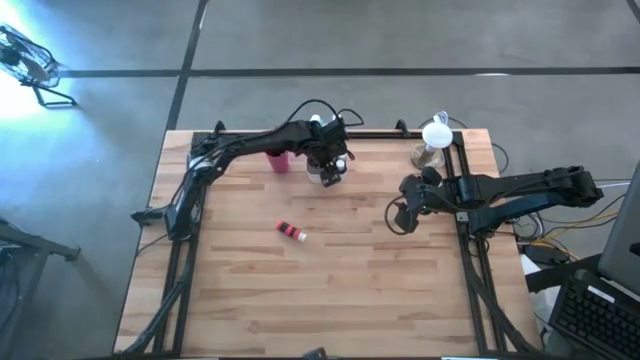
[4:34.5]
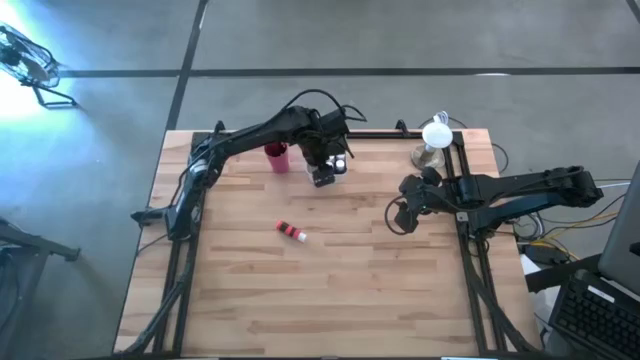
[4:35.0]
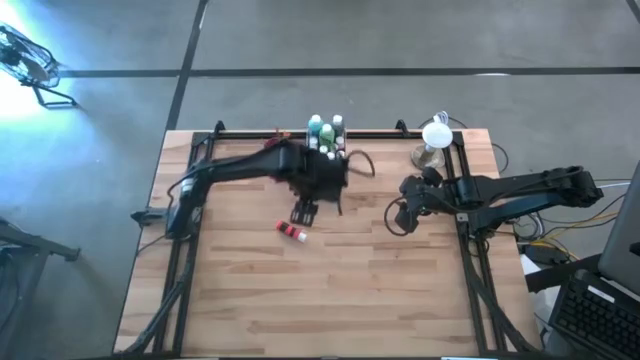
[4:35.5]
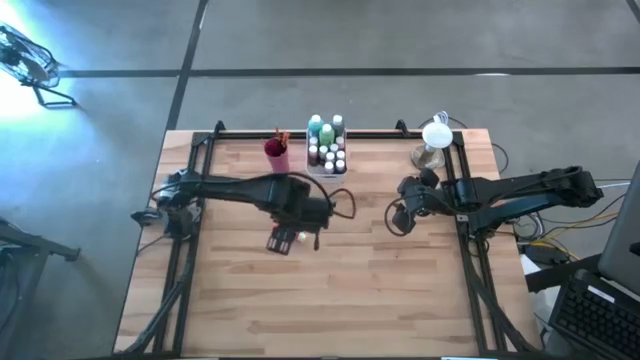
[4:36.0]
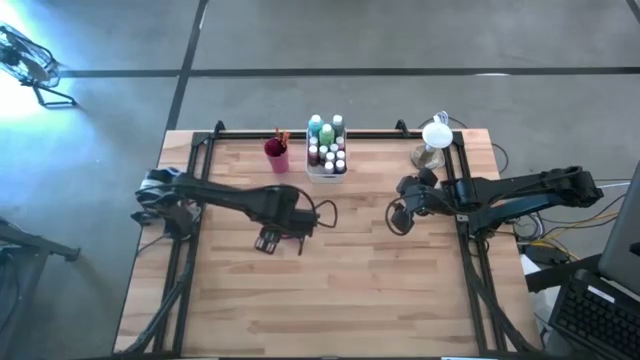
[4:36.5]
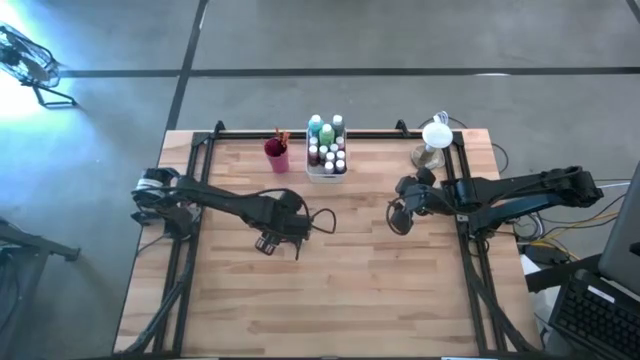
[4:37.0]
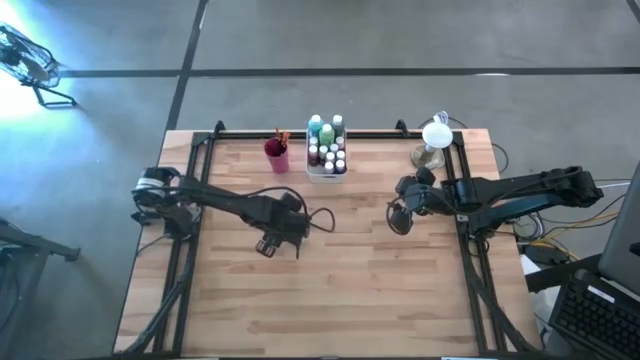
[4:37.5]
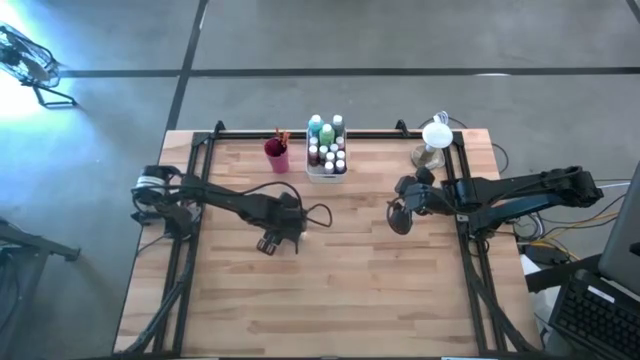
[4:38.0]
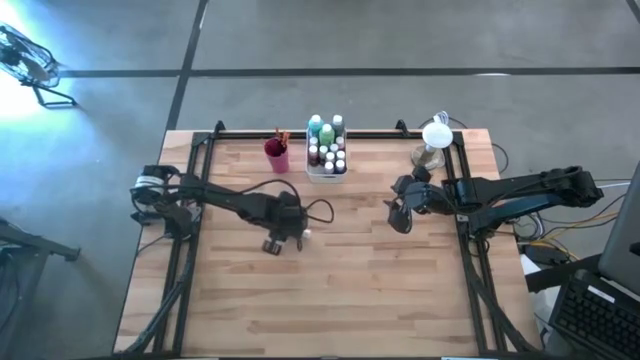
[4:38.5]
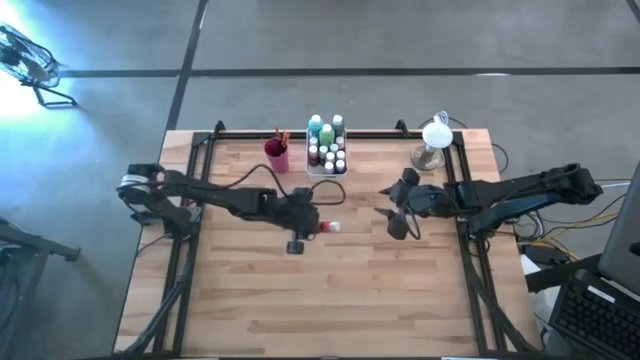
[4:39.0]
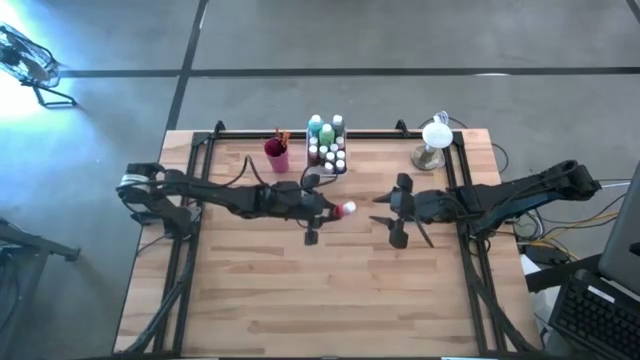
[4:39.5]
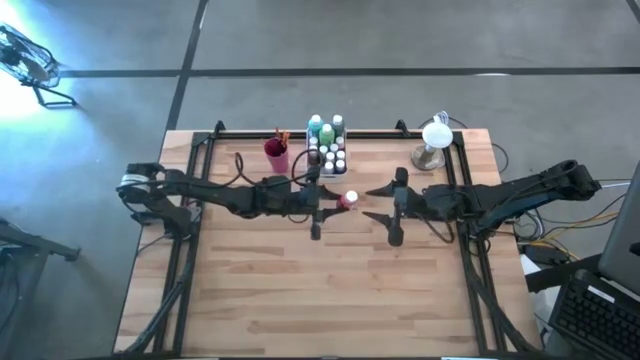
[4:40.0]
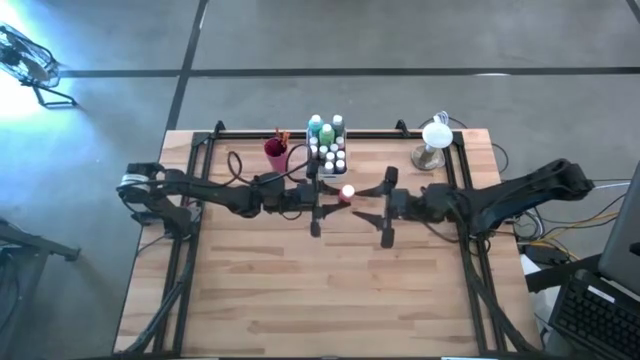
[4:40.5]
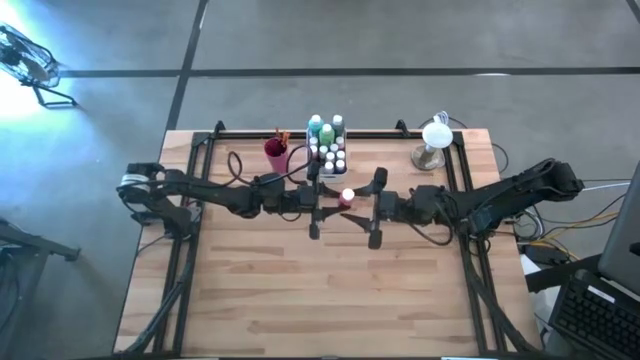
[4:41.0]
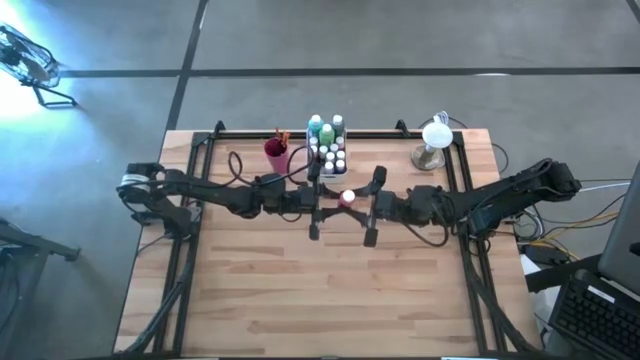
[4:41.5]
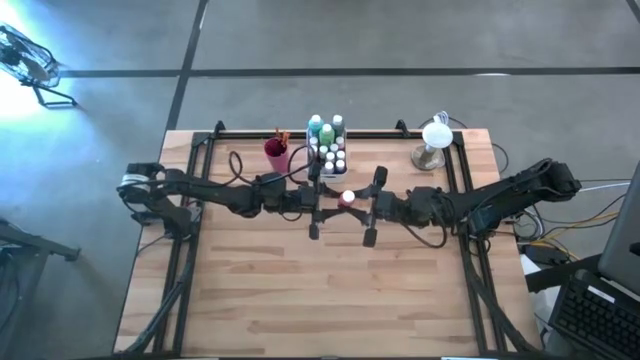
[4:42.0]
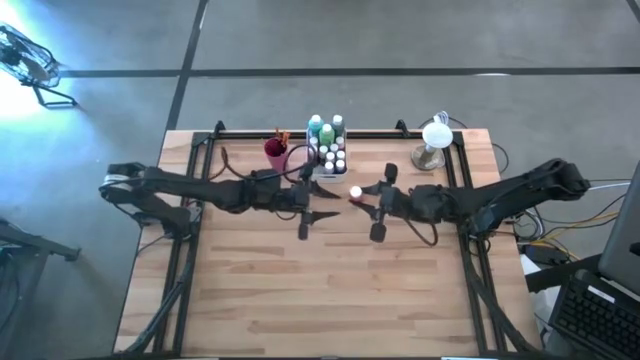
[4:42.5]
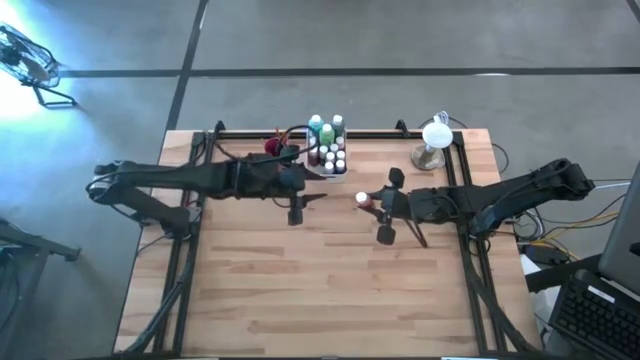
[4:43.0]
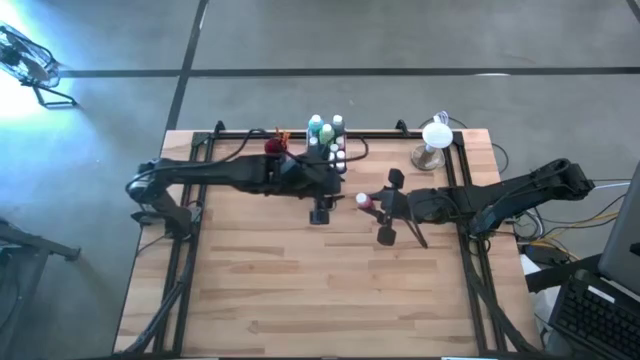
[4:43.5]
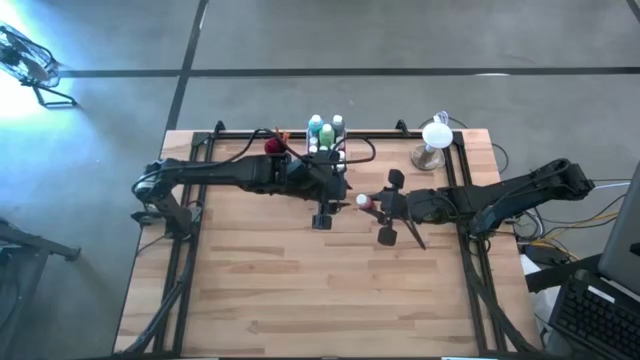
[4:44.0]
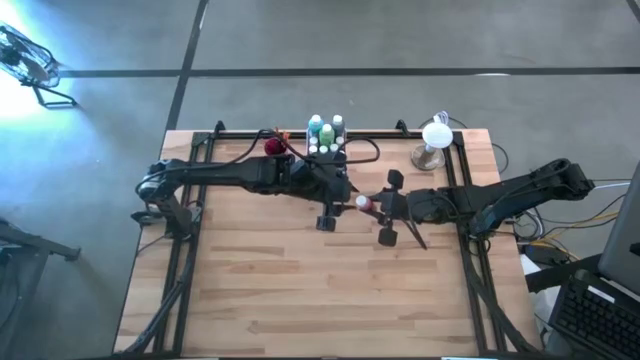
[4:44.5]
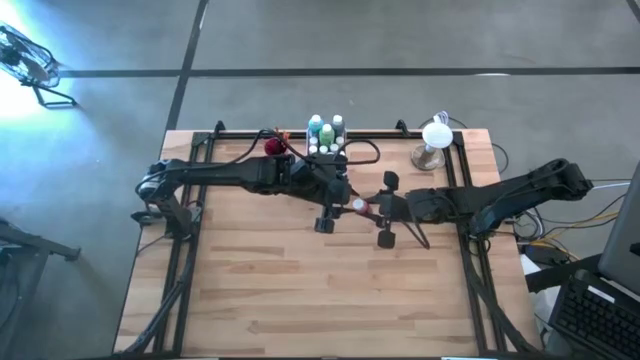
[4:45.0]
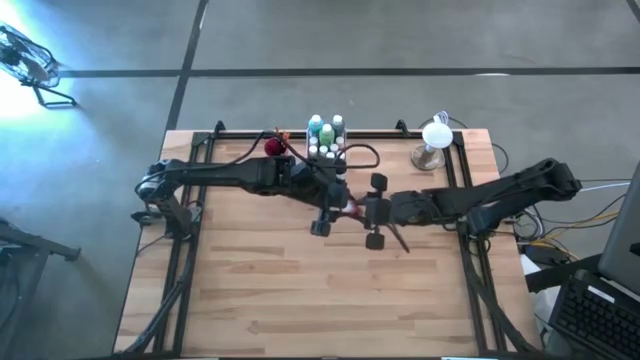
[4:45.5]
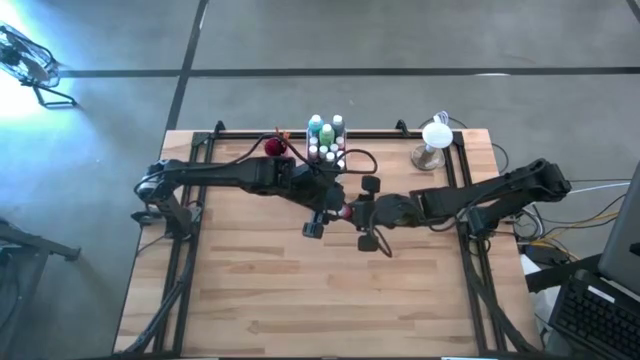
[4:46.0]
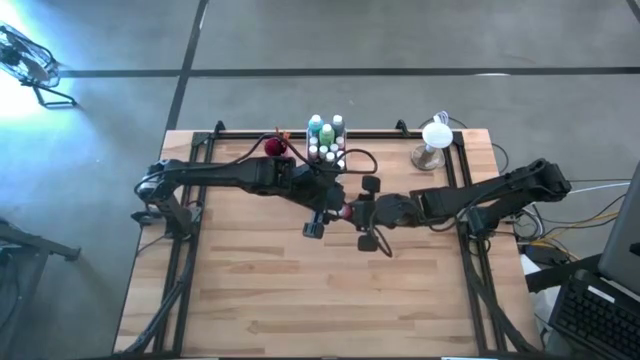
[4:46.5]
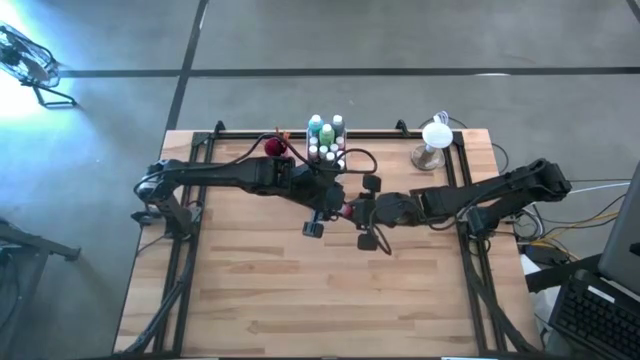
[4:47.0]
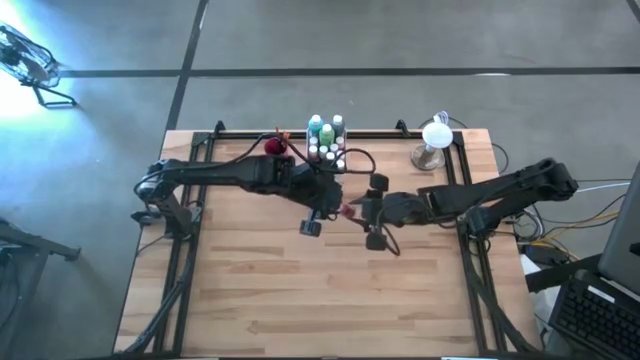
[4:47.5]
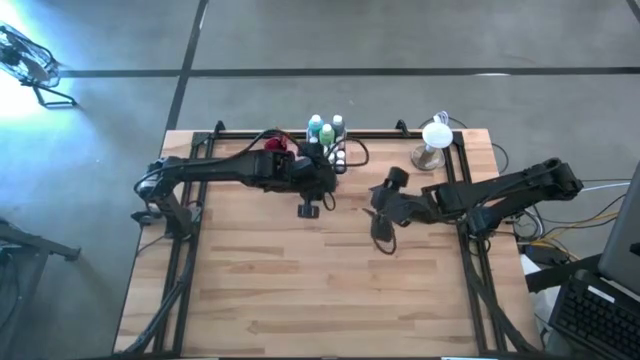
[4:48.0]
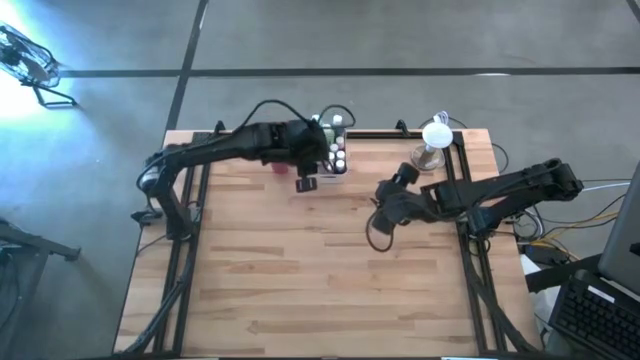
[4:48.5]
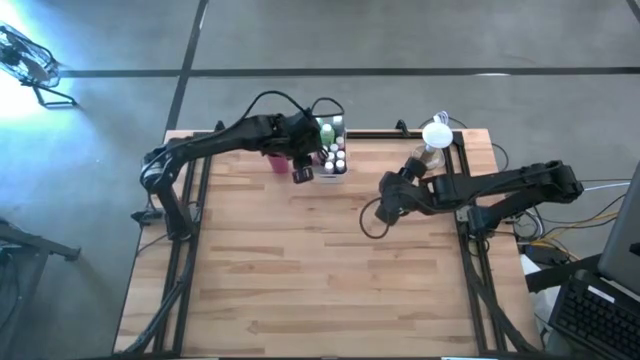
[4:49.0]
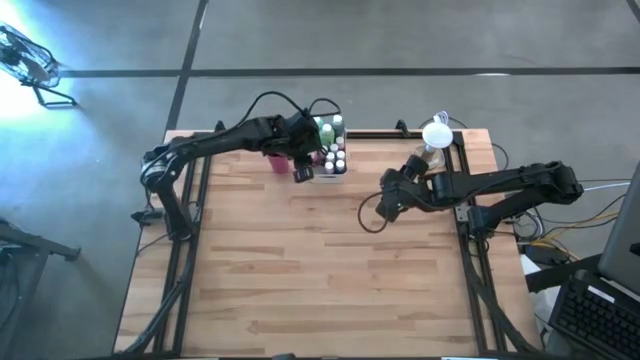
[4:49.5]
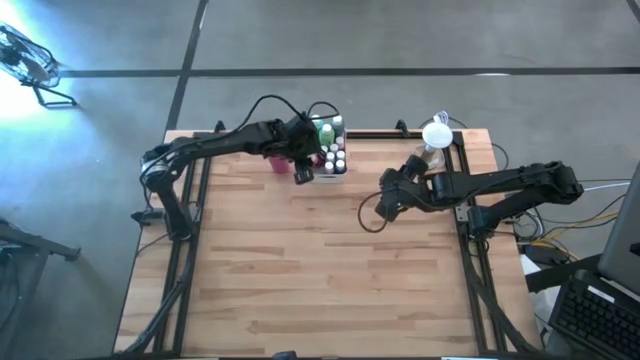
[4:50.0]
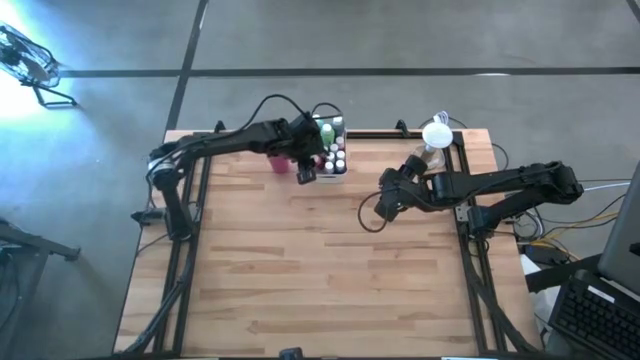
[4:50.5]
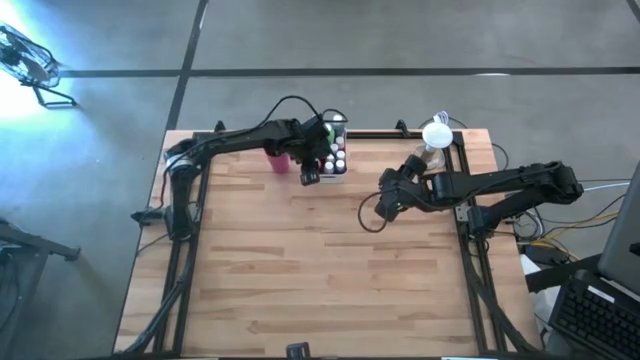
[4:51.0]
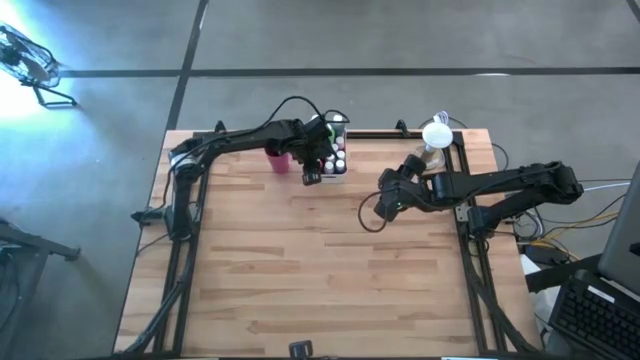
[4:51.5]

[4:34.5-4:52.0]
Task: Pick & Place Paint Supplies
Put the orange paint bottle into the white bin

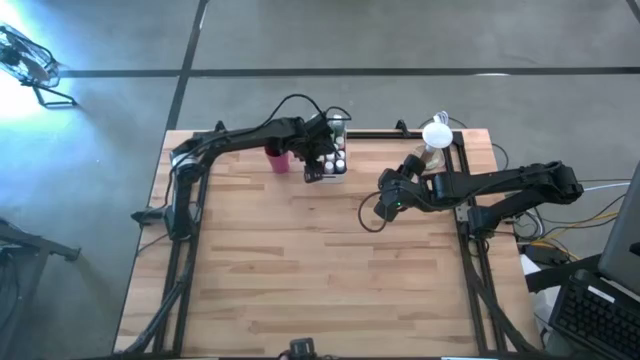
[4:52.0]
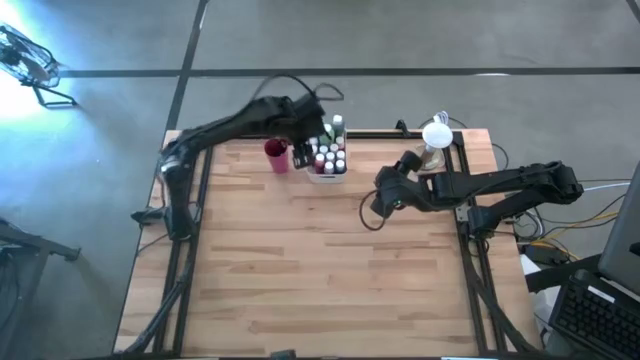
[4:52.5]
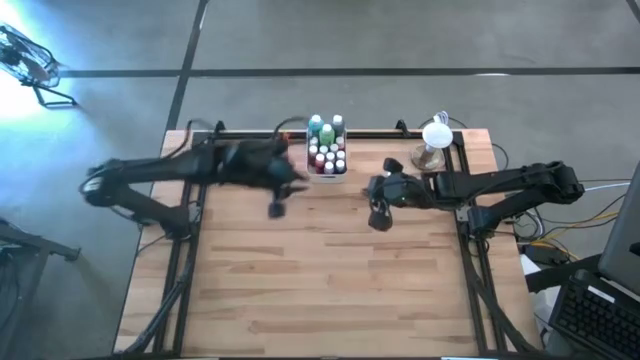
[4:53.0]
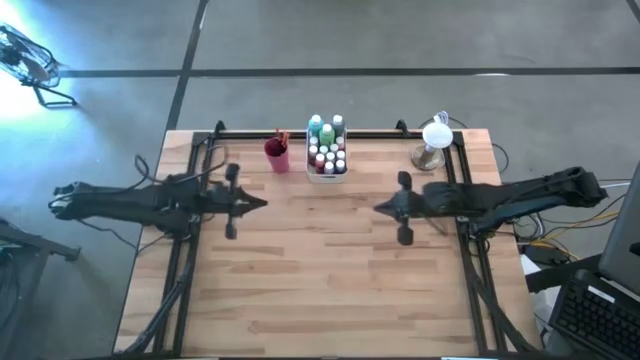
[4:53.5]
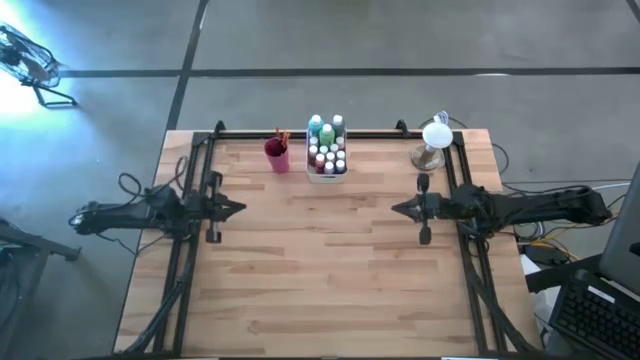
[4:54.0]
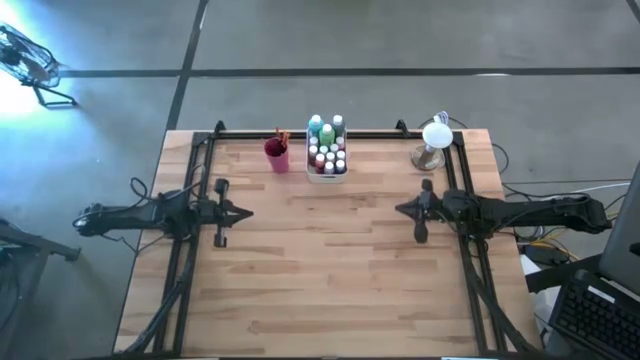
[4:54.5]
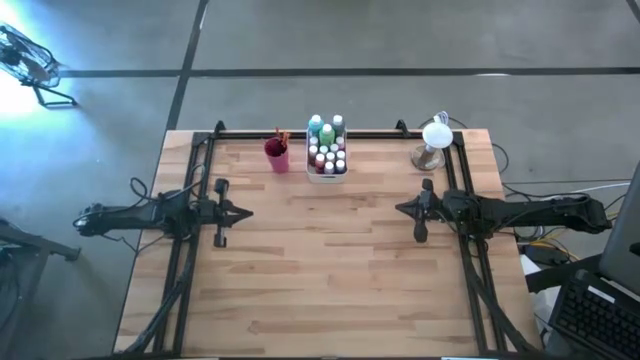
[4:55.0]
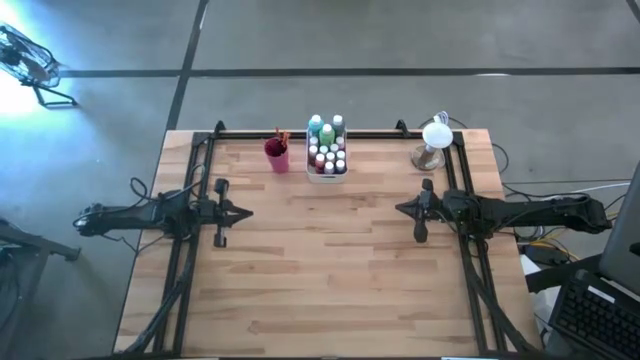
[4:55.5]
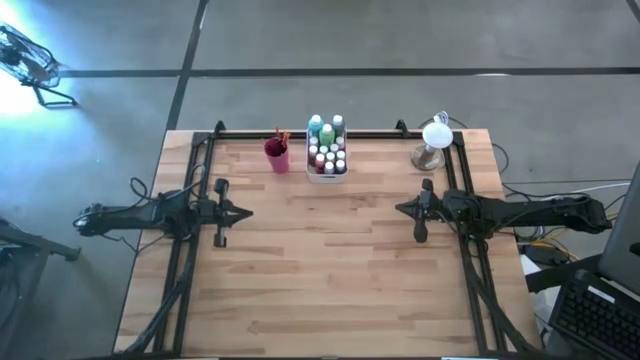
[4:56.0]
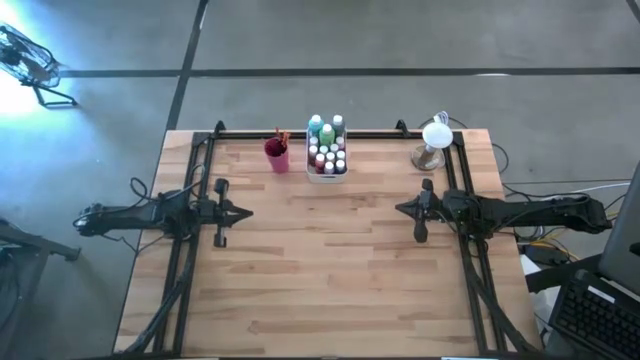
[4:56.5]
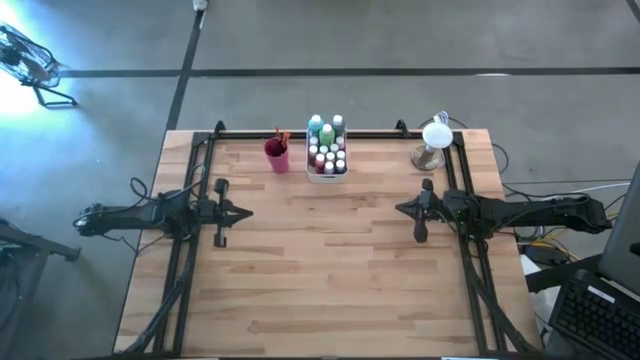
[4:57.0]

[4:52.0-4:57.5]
Return to Home Position
